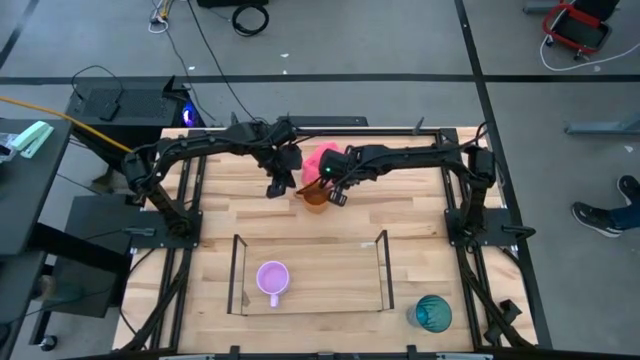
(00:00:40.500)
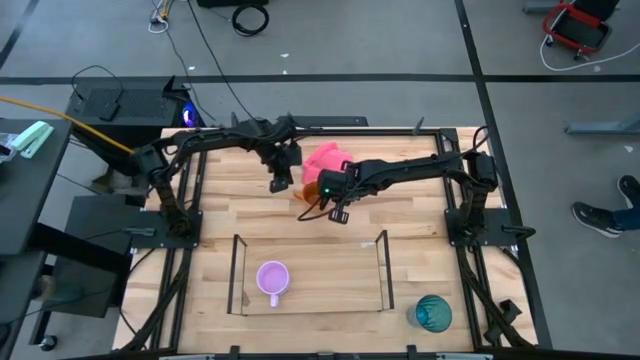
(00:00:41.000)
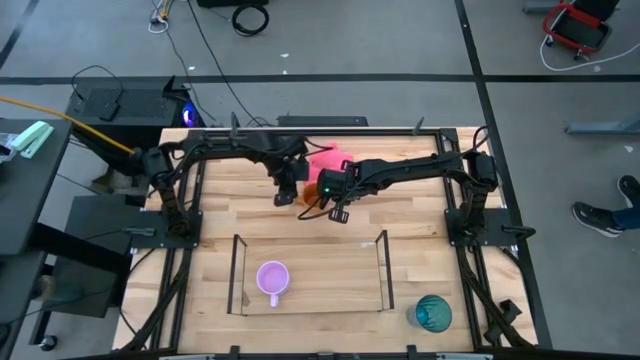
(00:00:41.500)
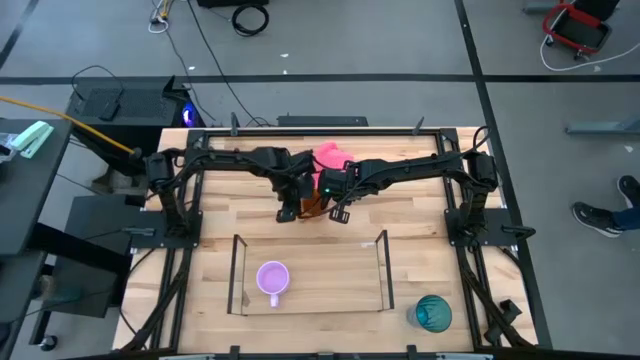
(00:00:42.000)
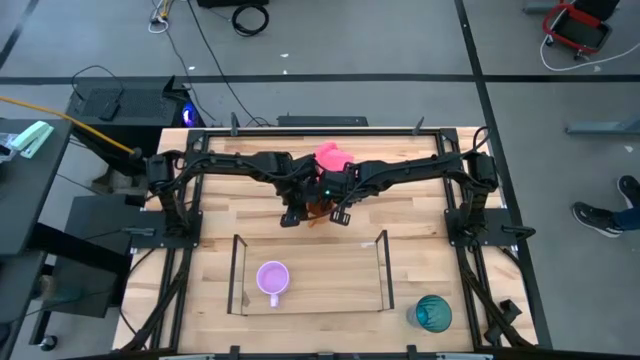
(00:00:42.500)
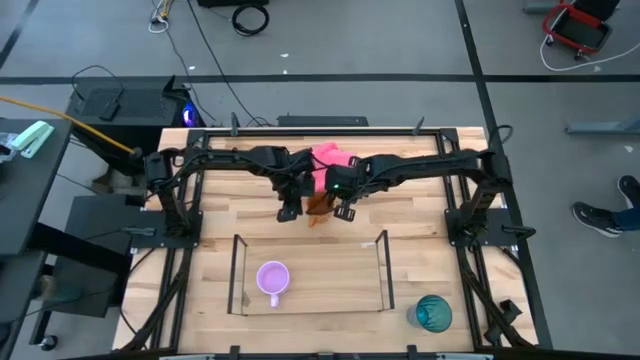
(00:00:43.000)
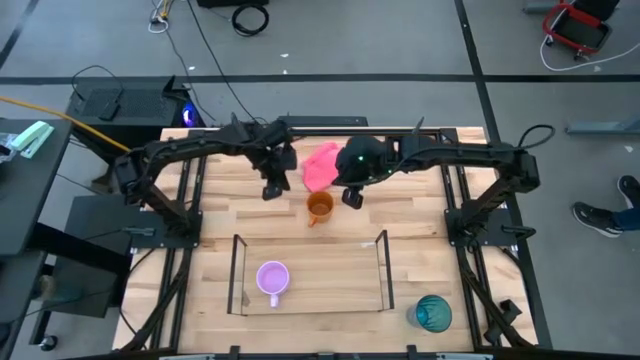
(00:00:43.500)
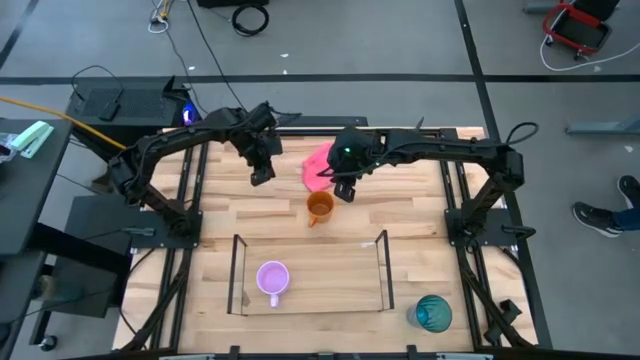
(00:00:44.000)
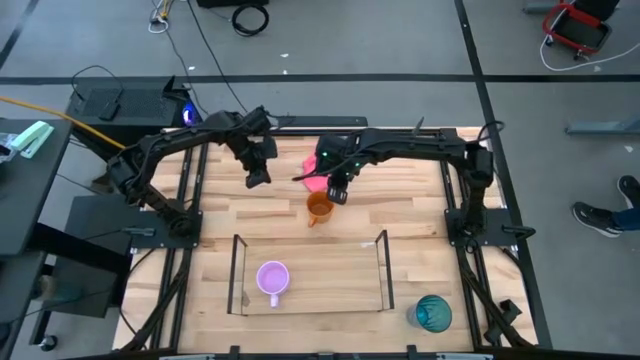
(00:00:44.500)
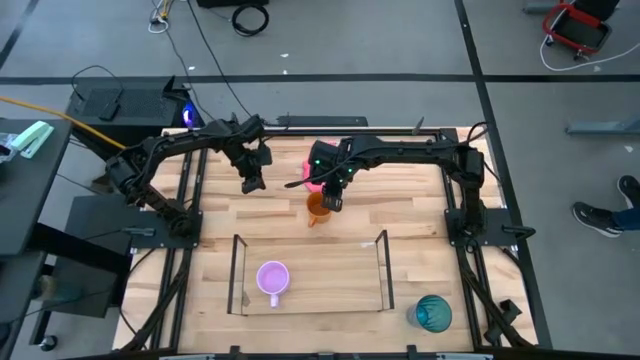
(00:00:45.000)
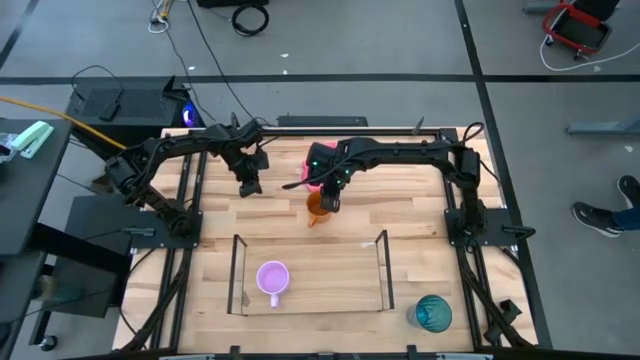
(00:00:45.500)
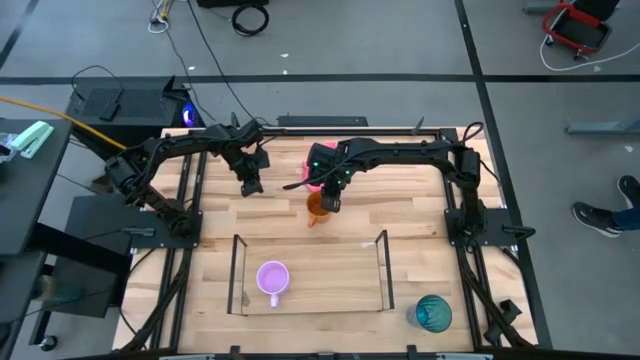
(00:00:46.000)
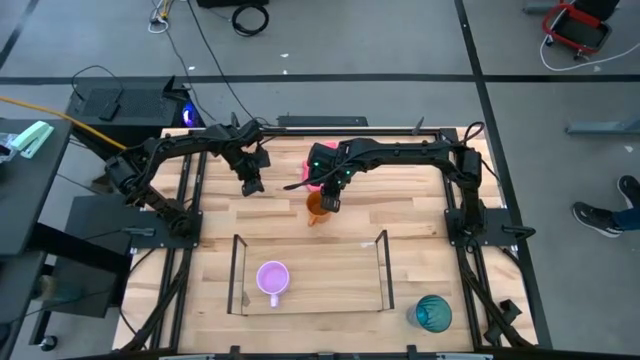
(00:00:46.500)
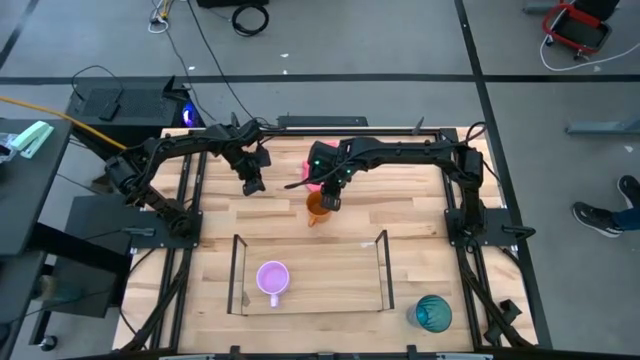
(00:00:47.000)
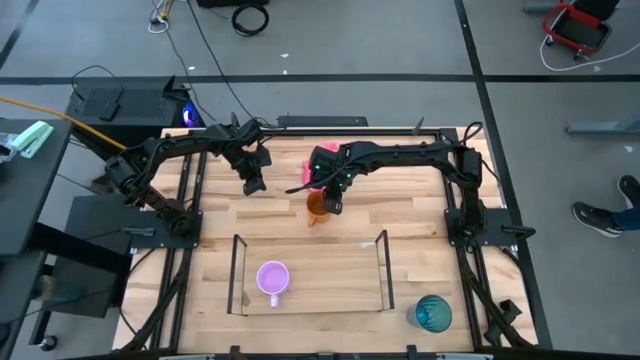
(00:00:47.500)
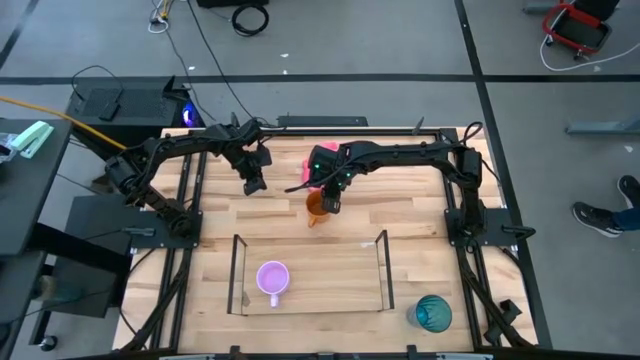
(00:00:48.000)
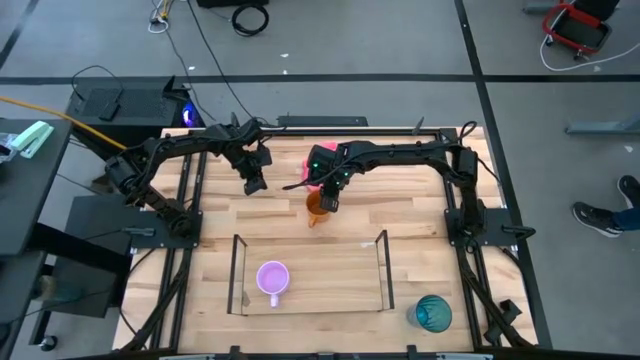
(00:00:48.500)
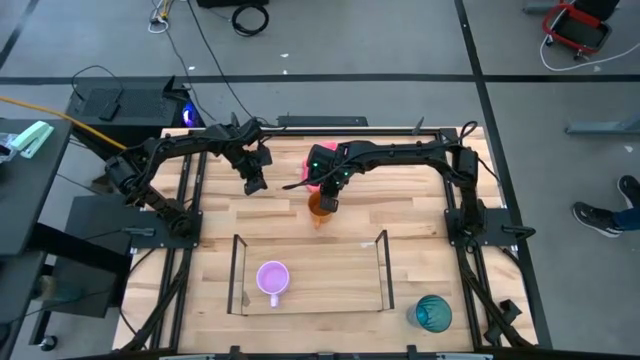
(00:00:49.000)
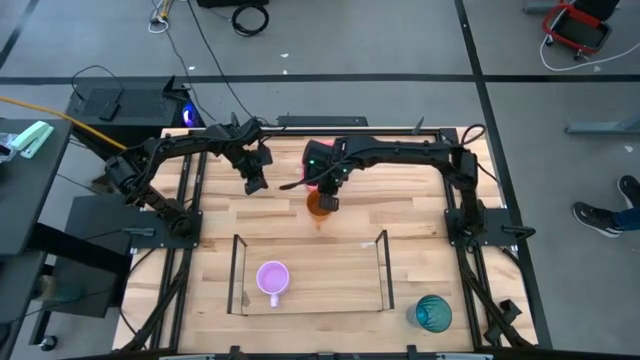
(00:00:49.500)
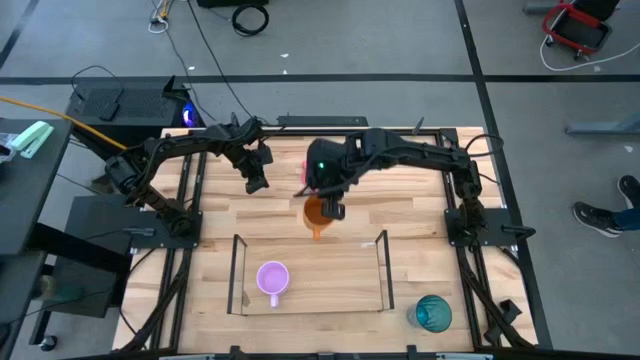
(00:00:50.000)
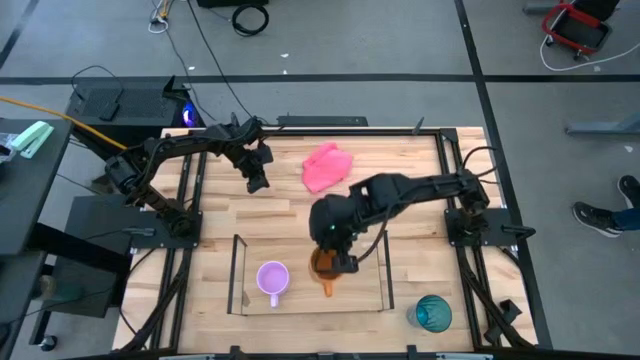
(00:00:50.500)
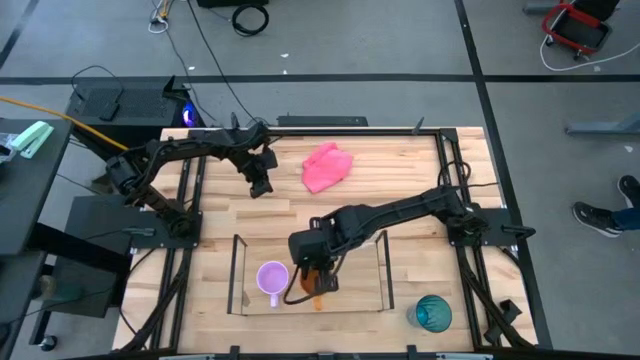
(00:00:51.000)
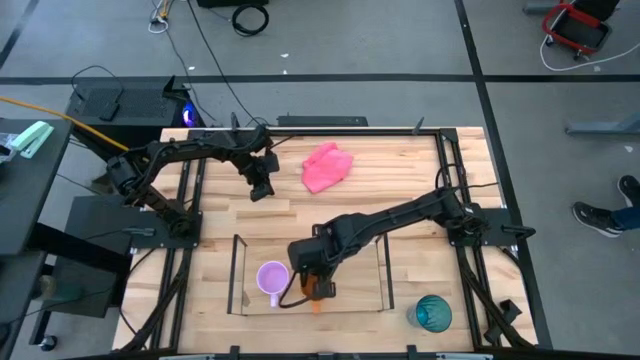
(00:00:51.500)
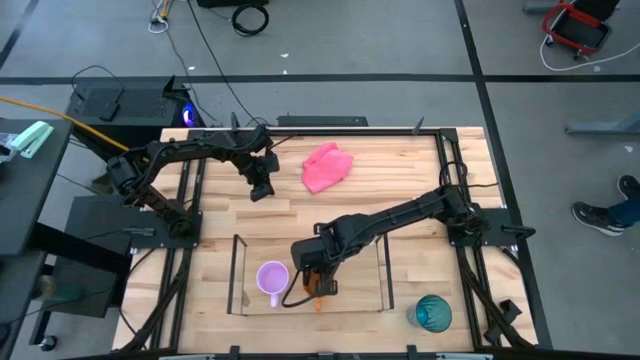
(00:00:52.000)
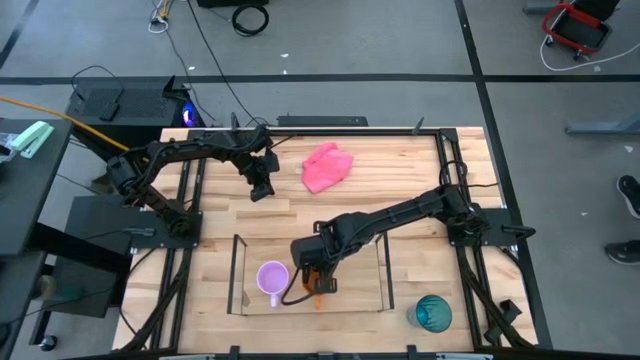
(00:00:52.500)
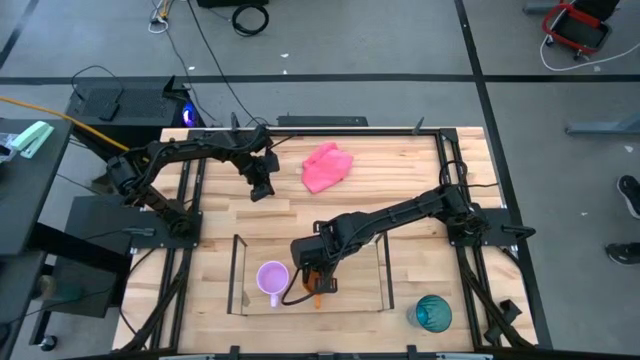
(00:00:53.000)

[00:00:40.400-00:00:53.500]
Task: Stack small to large cups/mugs on shelf
Put the orange mug on the shelf

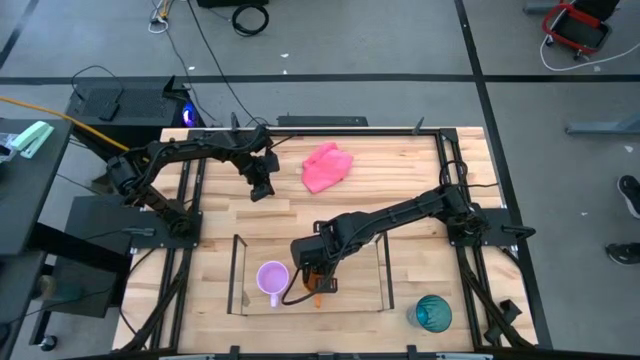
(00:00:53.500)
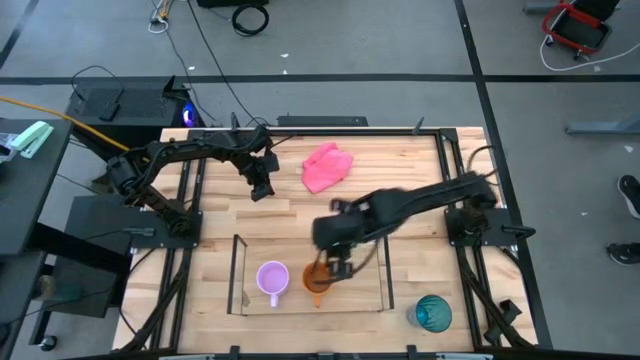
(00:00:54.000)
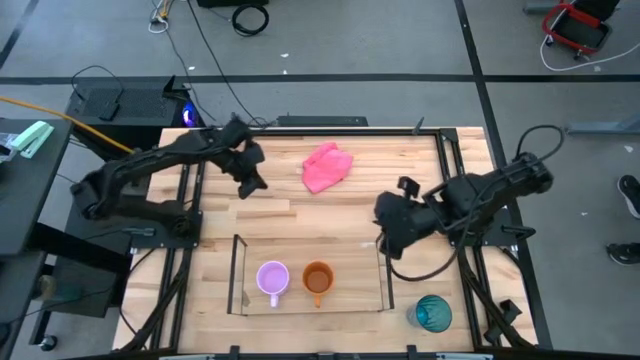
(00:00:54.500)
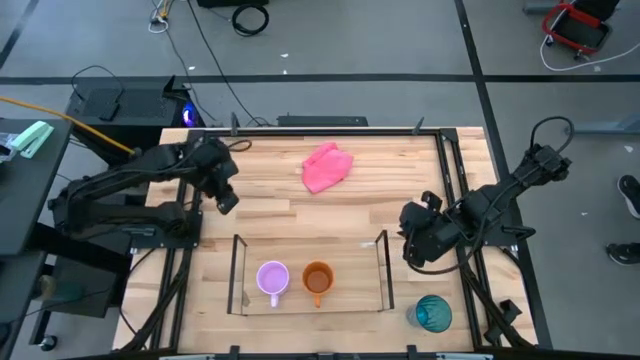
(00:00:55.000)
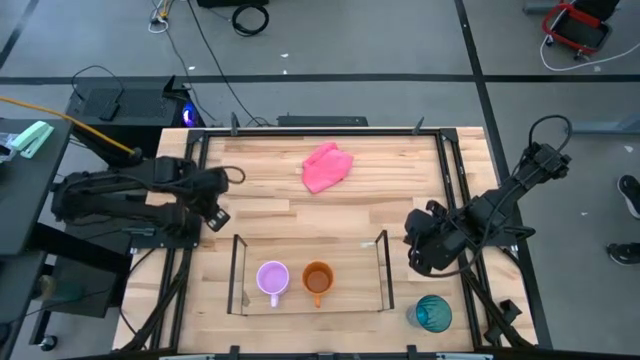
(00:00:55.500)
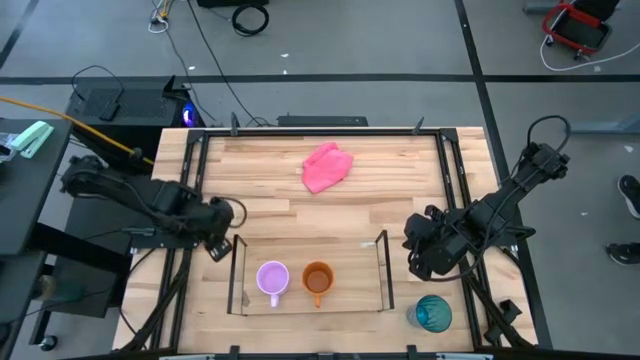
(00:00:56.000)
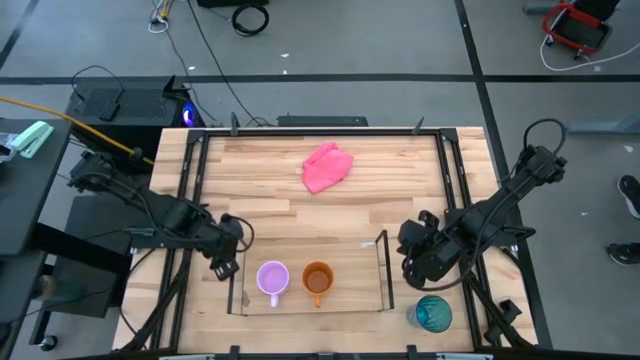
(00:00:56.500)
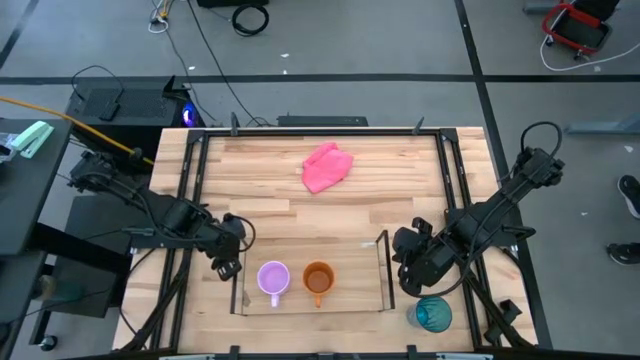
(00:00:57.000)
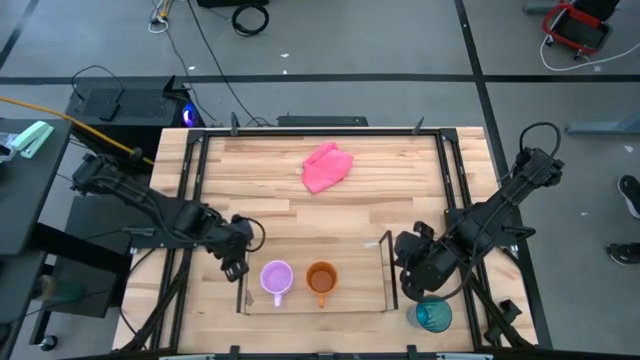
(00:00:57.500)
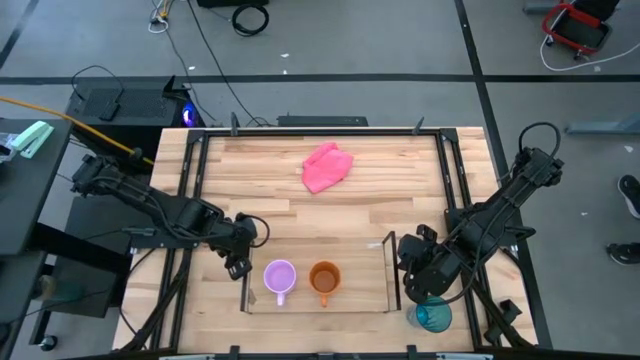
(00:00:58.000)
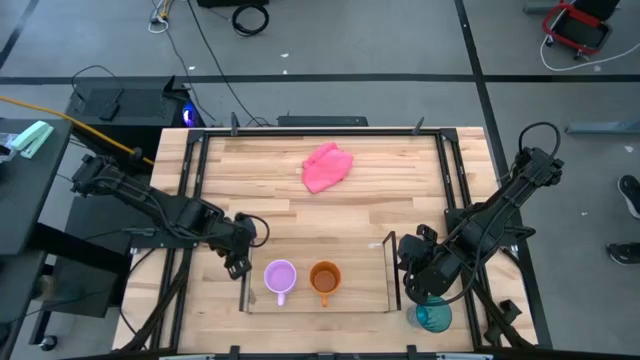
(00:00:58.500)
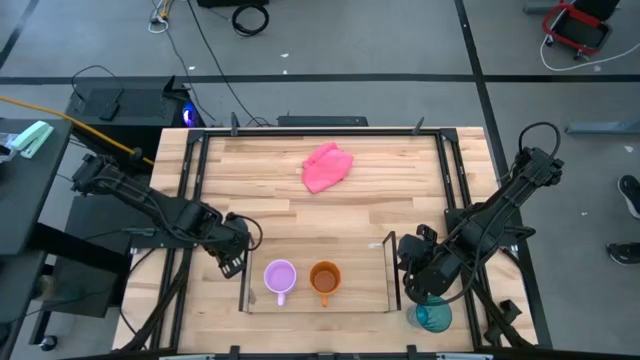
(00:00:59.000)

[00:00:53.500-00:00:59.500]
Adjust the shelf
